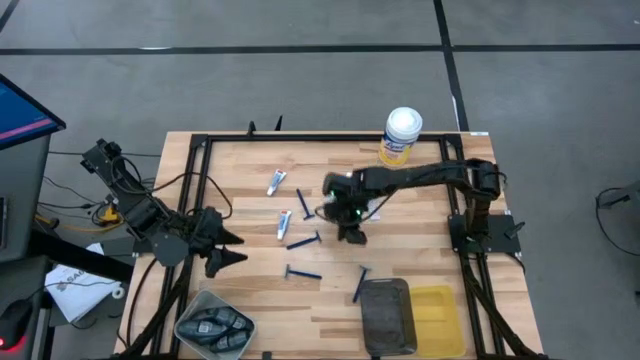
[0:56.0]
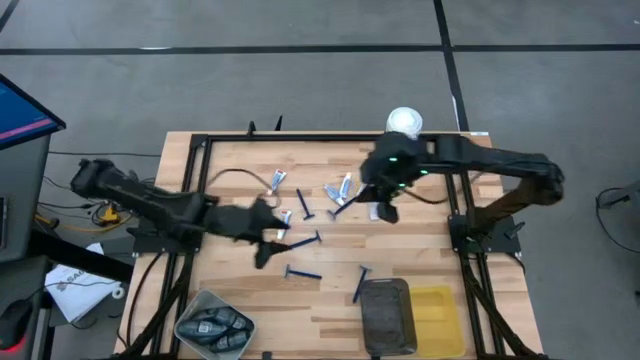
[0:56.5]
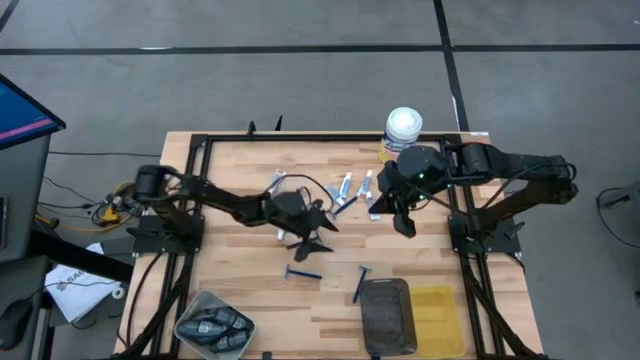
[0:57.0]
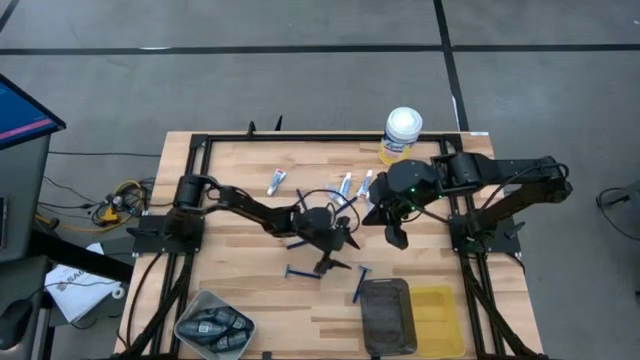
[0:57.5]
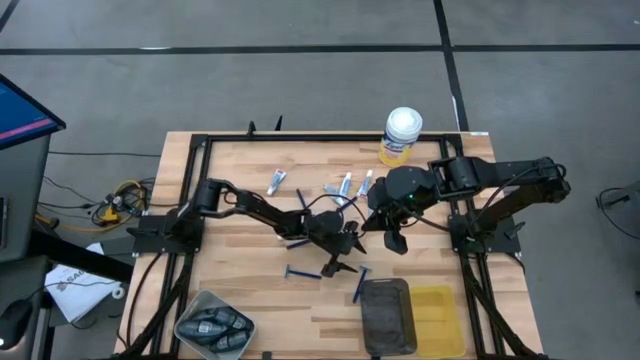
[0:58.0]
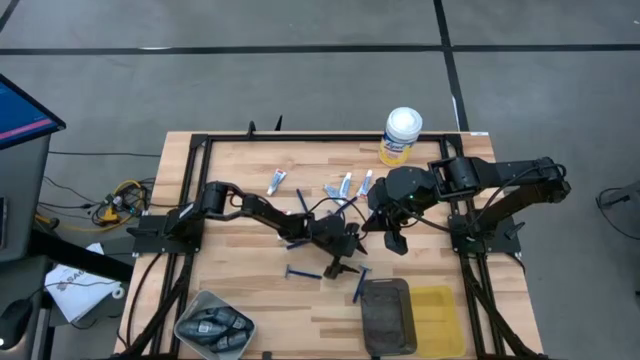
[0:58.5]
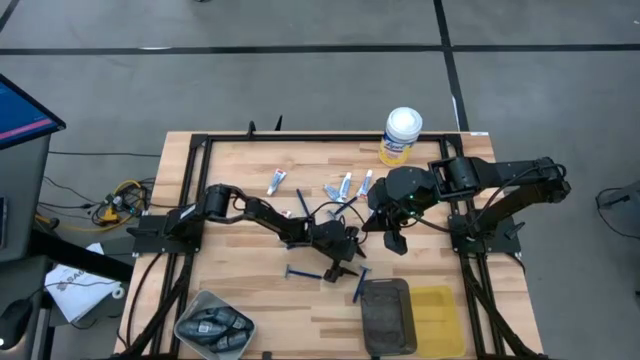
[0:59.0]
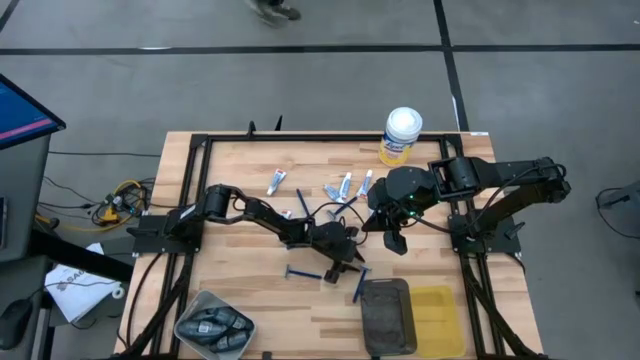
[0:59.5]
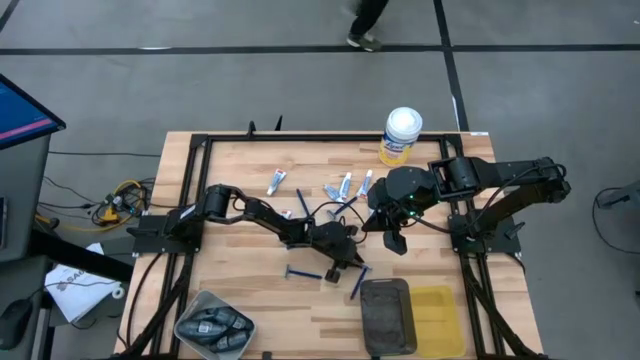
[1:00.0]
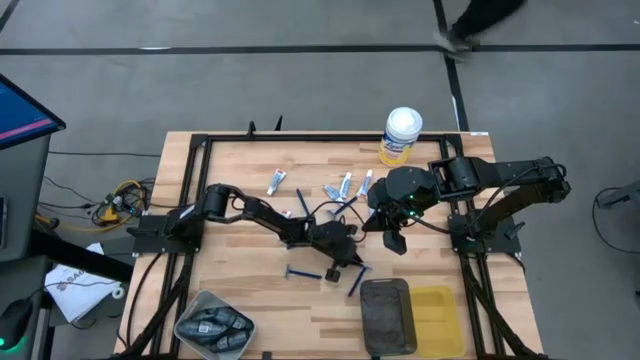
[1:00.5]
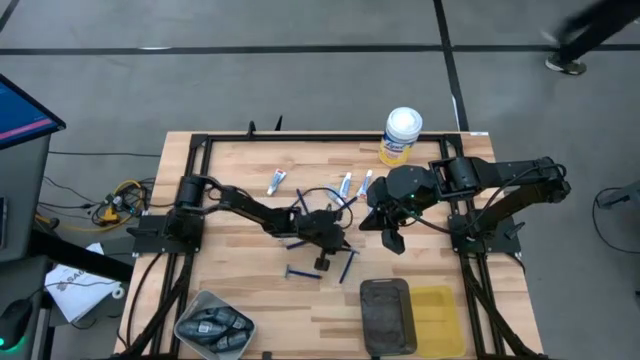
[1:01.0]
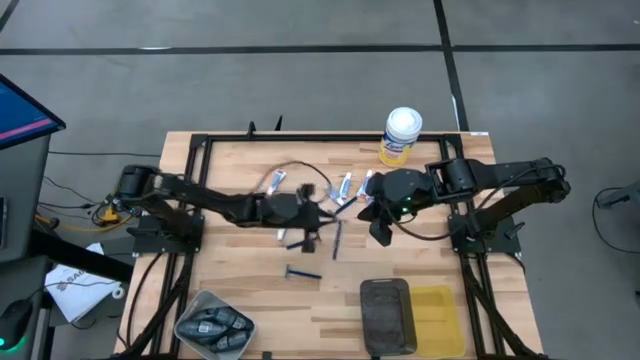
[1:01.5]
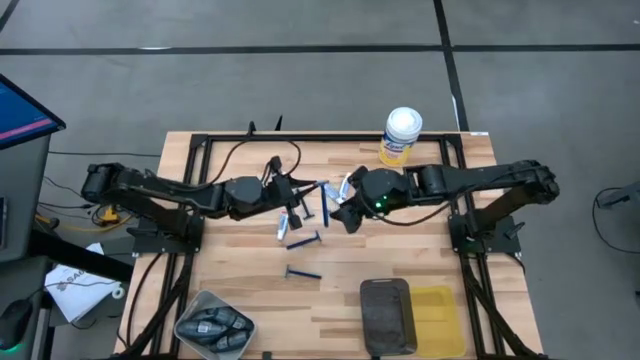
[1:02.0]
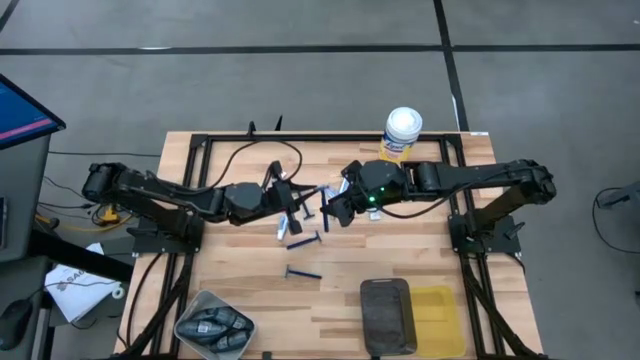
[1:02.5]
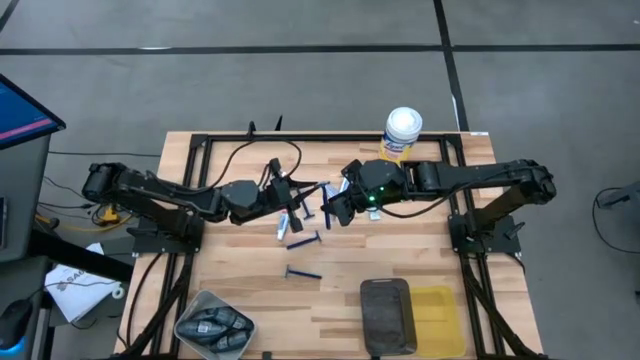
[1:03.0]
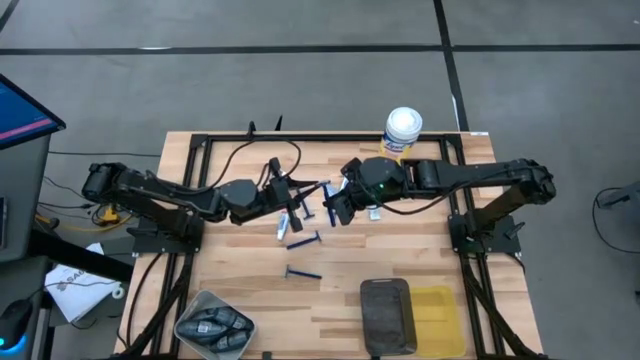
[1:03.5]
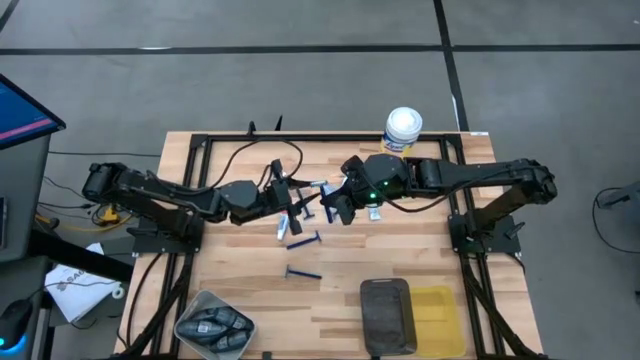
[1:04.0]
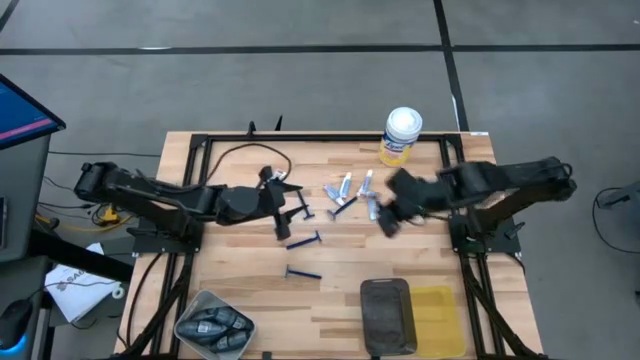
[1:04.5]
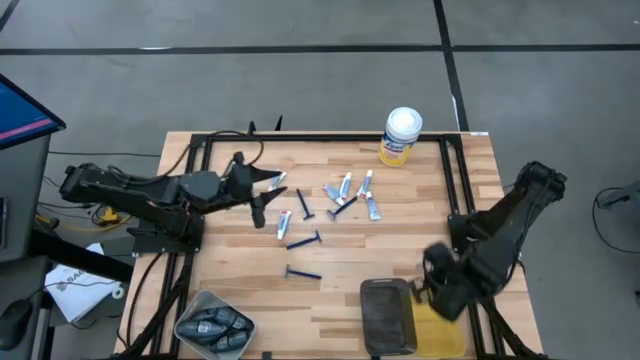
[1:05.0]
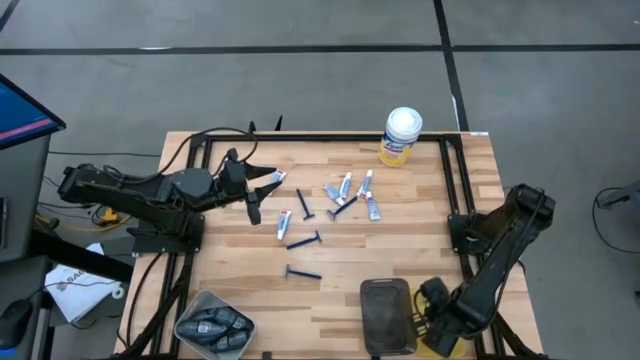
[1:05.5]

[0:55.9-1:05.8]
Task: Pick & Place Travel size toiletries
Put the razor into the yellow bin

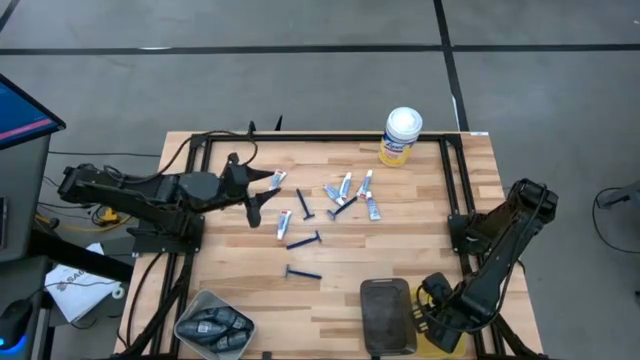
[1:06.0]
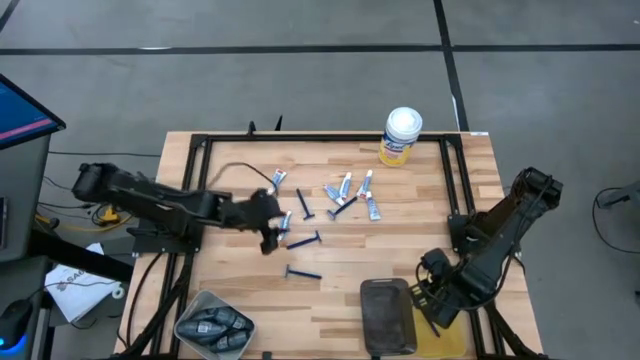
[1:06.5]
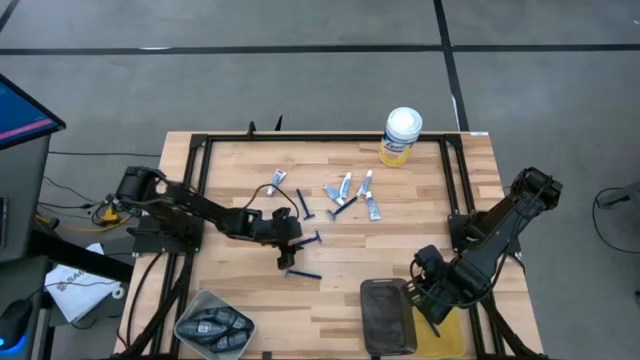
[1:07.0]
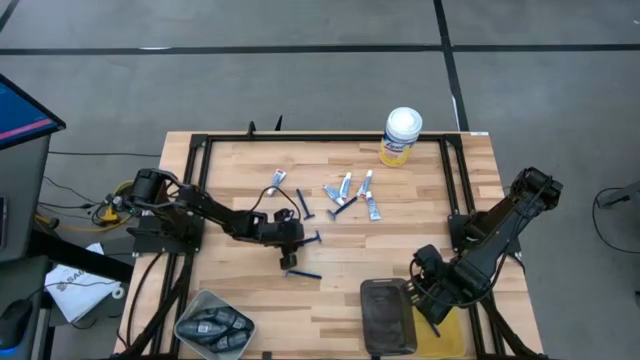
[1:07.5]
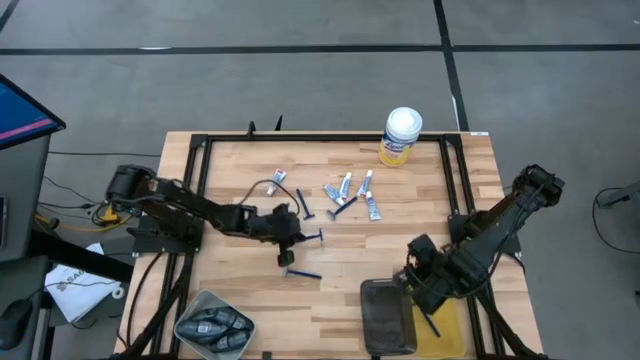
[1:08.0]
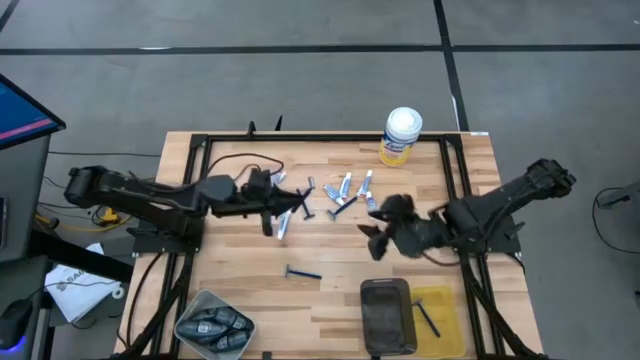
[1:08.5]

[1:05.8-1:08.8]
Put the razor into the yellow bin

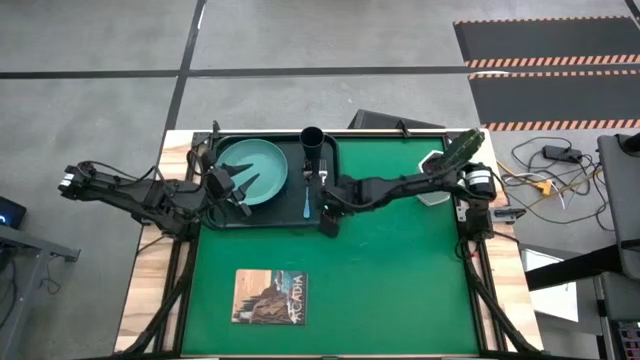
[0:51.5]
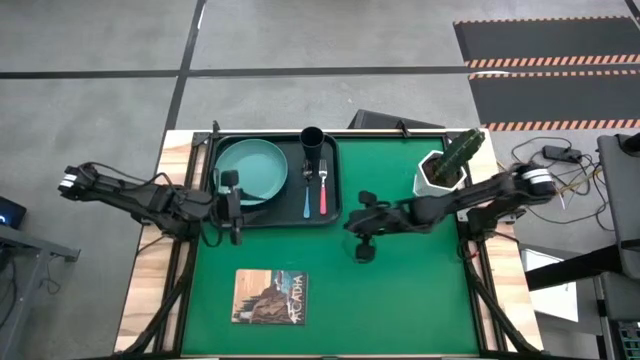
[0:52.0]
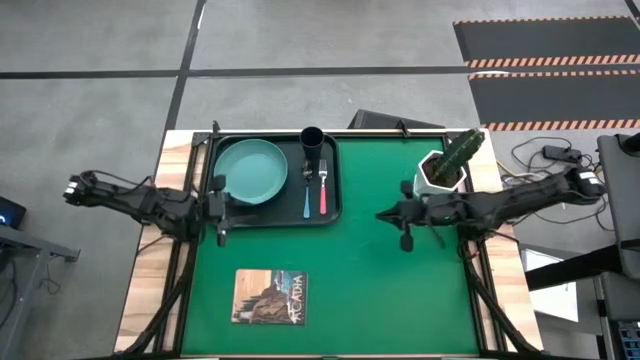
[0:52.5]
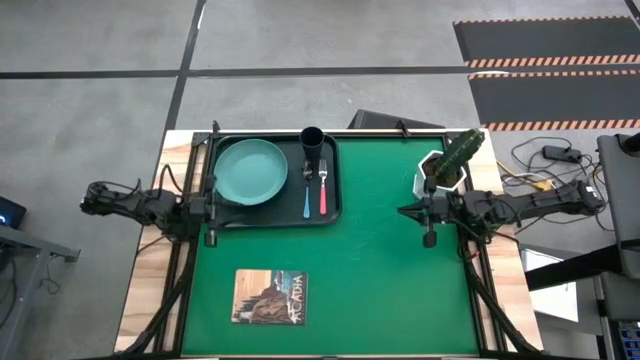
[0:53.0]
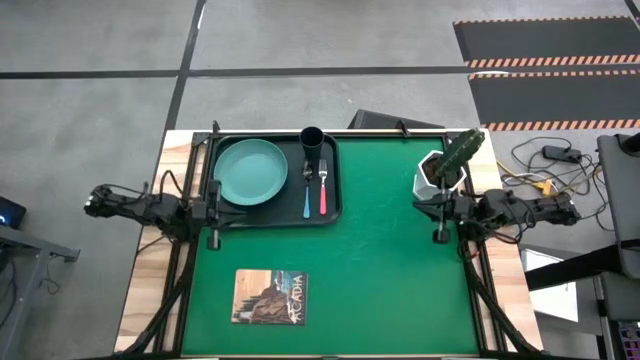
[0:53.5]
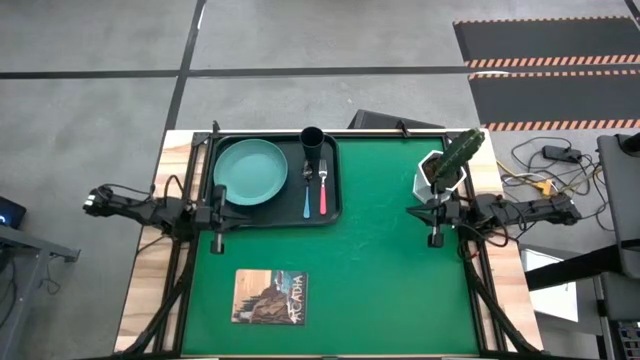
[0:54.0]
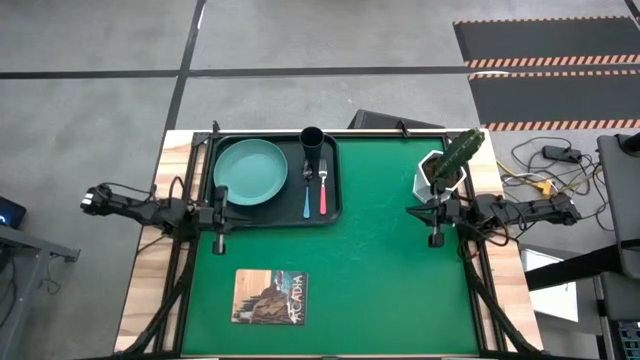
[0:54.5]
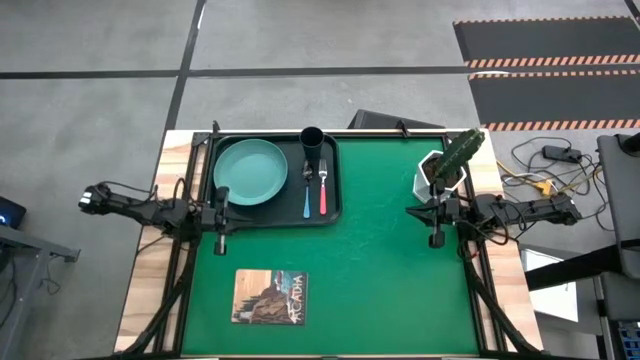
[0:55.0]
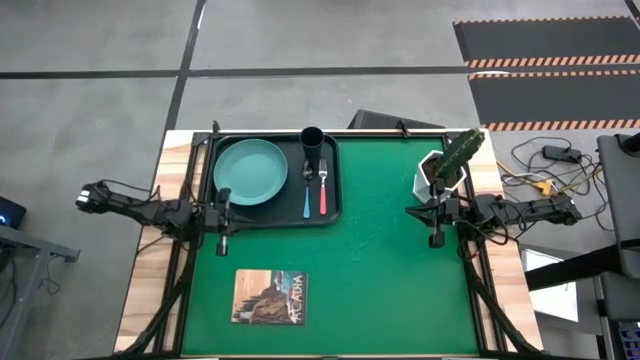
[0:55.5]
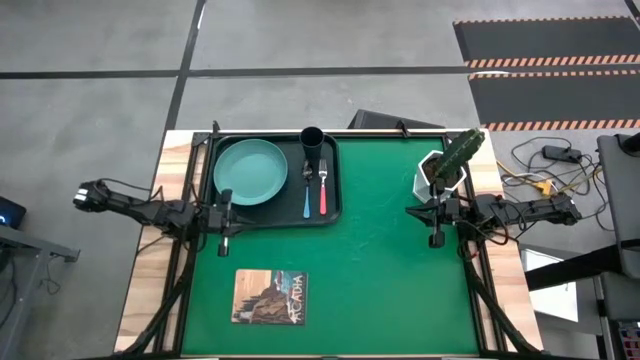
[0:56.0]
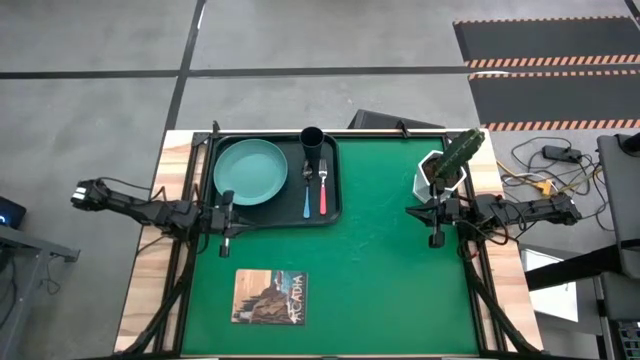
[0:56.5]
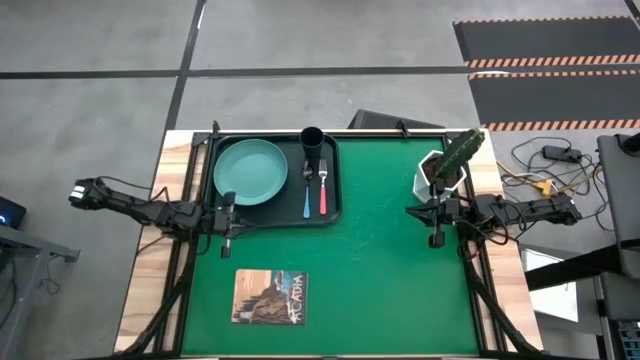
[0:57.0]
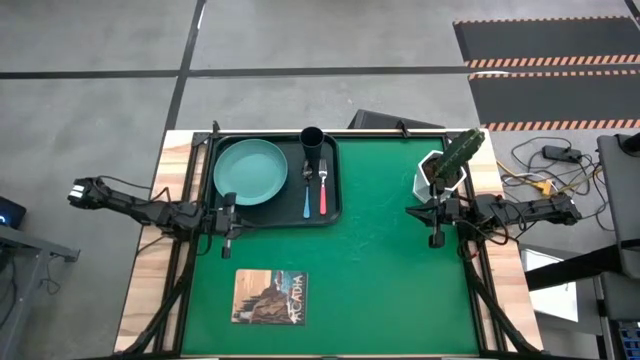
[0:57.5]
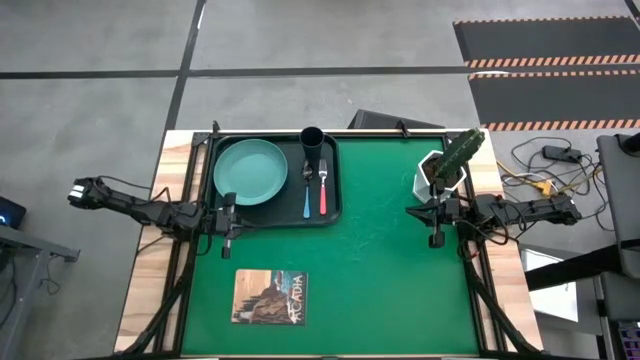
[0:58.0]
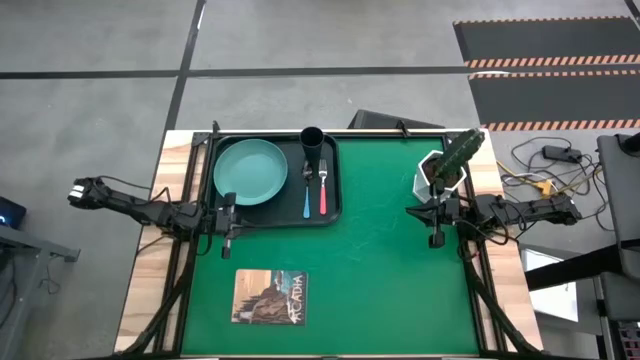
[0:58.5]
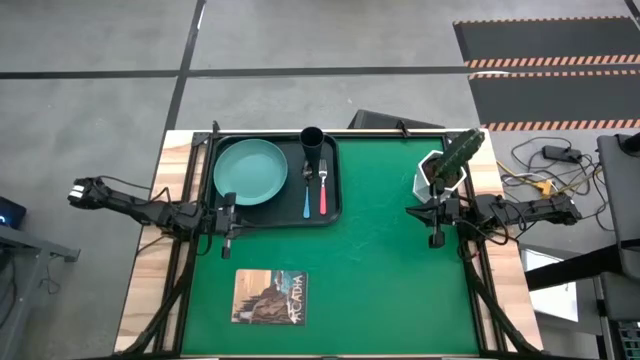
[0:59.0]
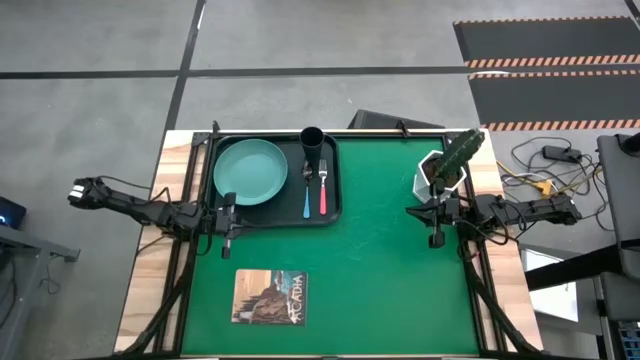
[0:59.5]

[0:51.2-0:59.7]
Task: Pick and place plate/cup/fork/spoon on tray
Return to Home Position
